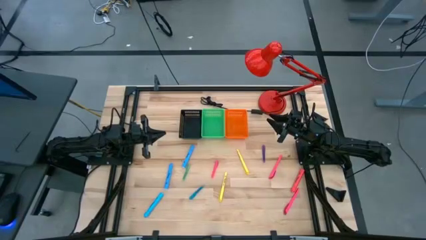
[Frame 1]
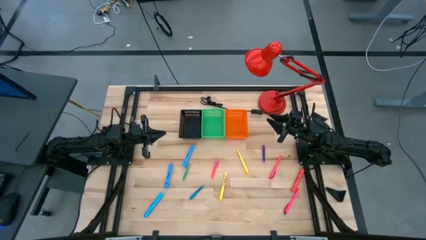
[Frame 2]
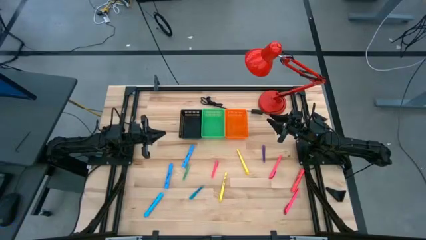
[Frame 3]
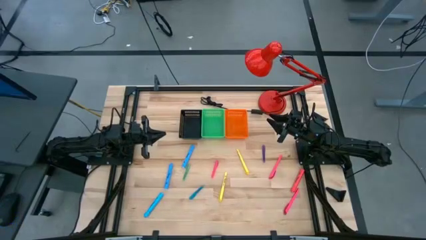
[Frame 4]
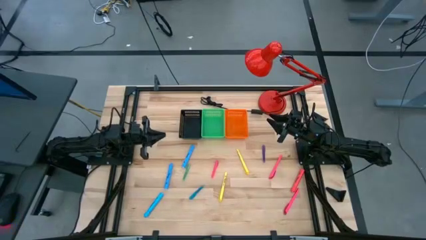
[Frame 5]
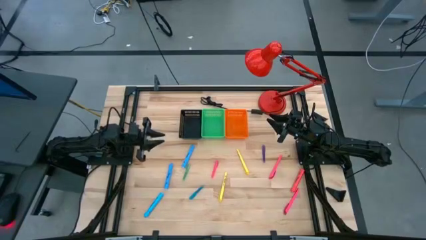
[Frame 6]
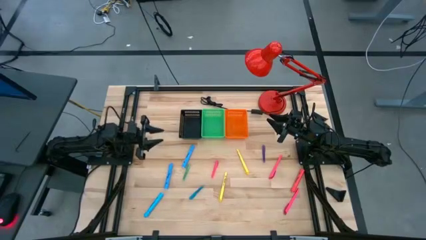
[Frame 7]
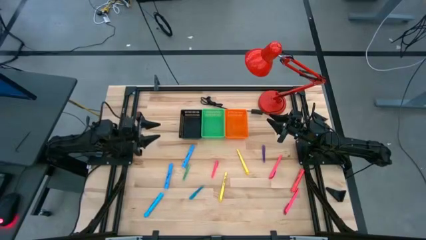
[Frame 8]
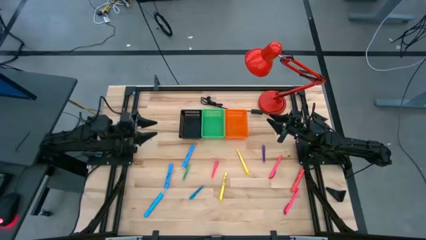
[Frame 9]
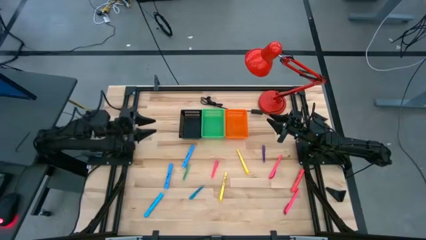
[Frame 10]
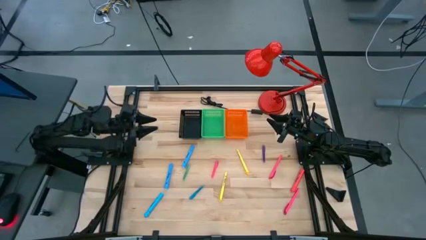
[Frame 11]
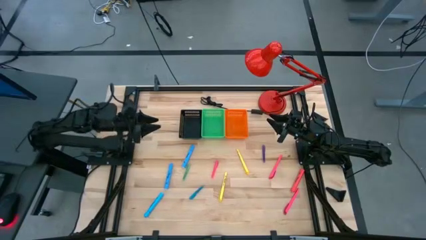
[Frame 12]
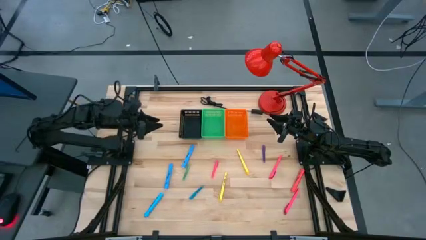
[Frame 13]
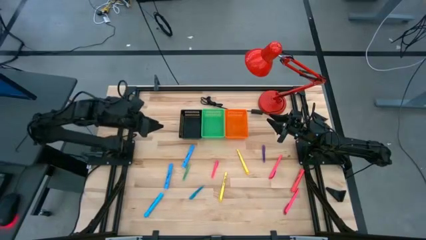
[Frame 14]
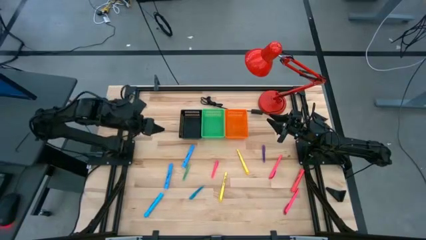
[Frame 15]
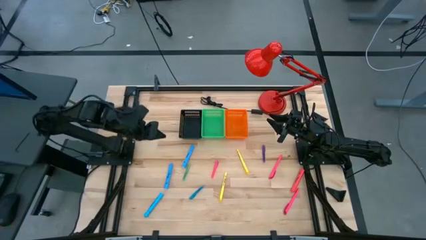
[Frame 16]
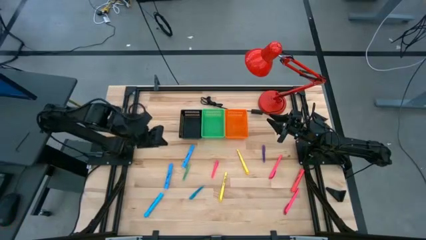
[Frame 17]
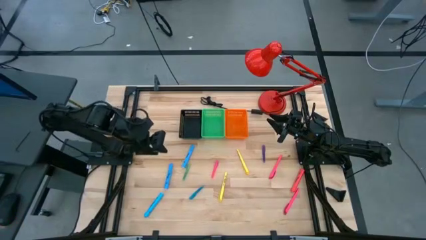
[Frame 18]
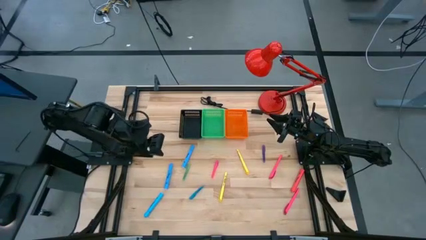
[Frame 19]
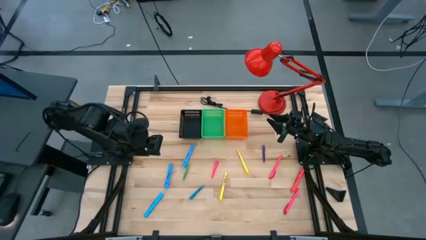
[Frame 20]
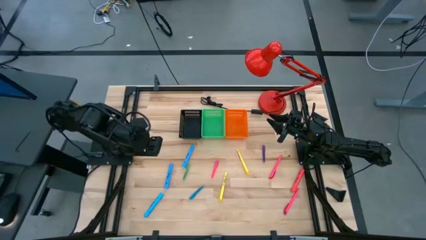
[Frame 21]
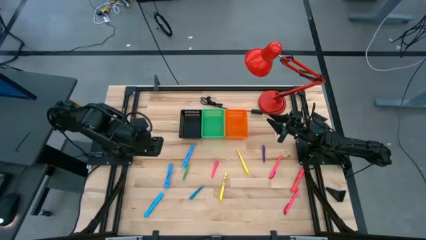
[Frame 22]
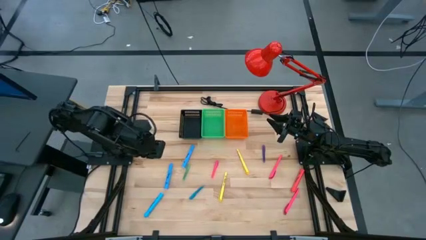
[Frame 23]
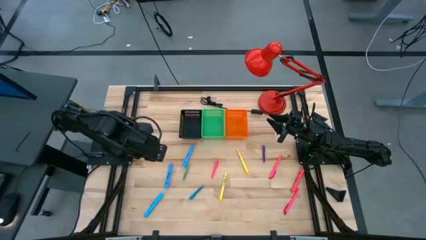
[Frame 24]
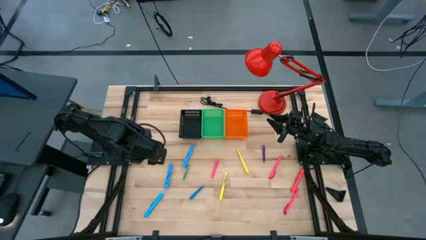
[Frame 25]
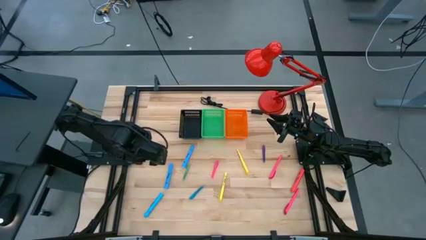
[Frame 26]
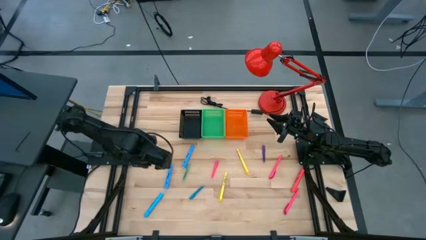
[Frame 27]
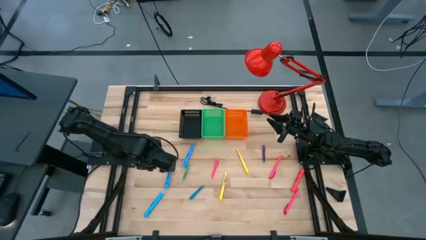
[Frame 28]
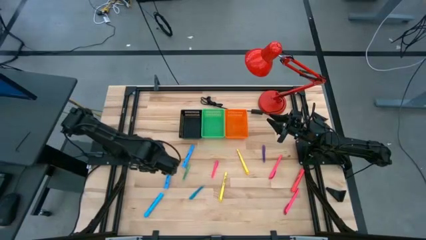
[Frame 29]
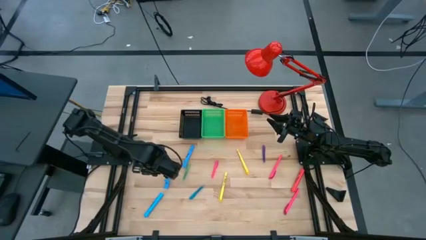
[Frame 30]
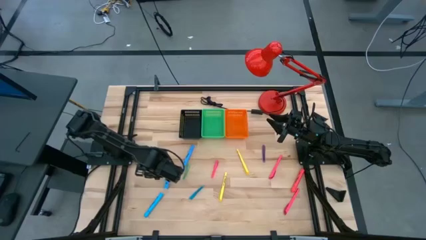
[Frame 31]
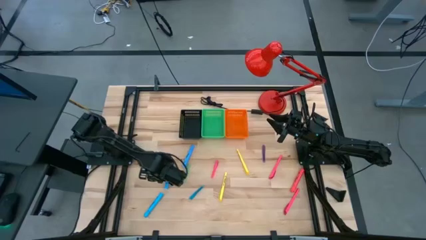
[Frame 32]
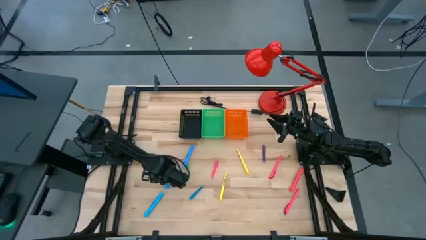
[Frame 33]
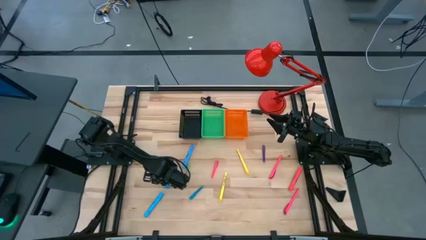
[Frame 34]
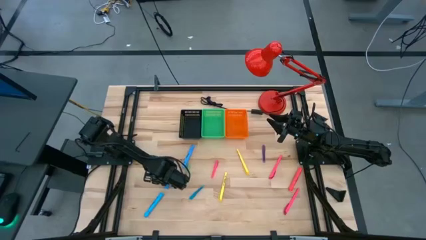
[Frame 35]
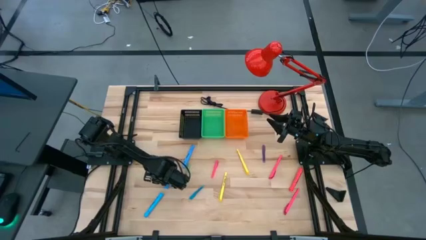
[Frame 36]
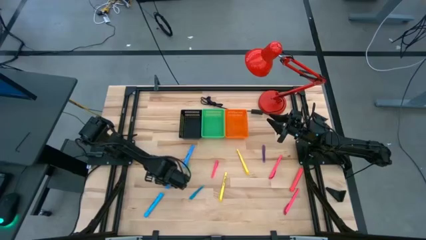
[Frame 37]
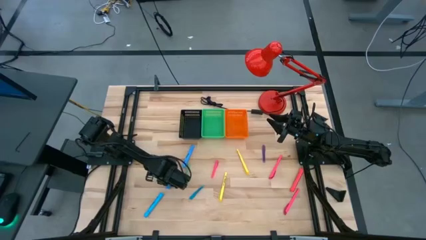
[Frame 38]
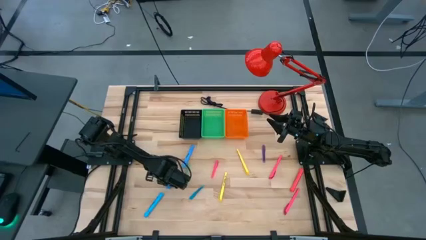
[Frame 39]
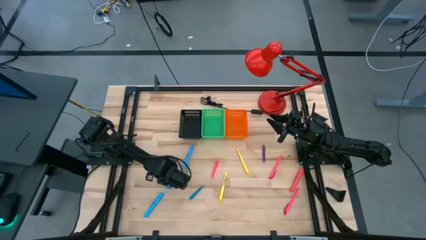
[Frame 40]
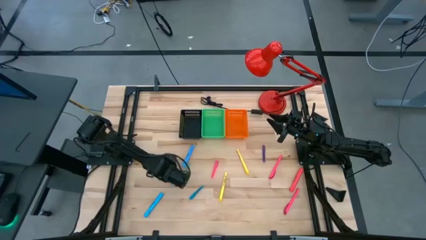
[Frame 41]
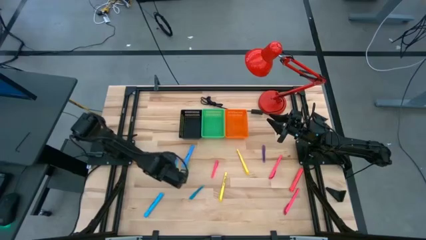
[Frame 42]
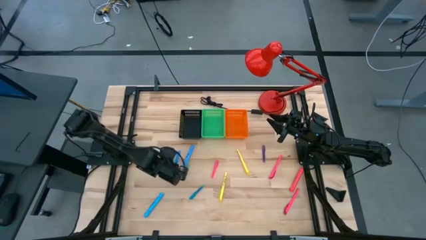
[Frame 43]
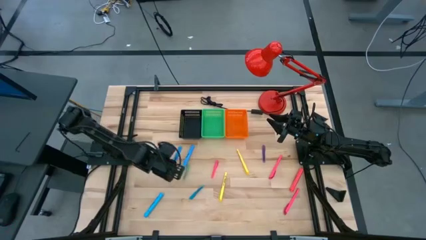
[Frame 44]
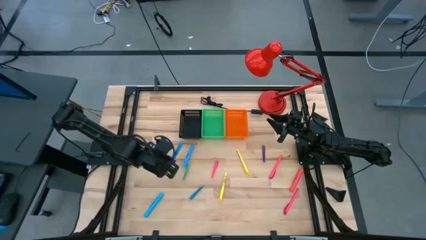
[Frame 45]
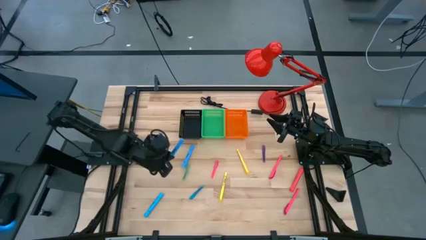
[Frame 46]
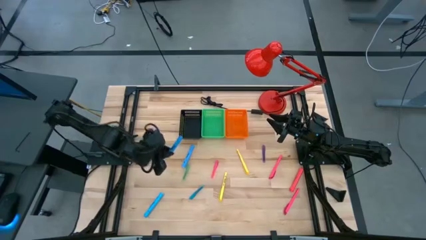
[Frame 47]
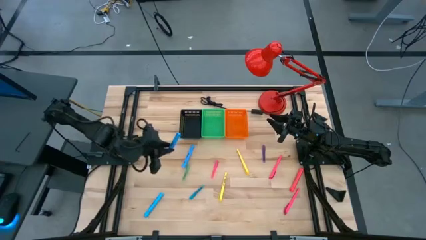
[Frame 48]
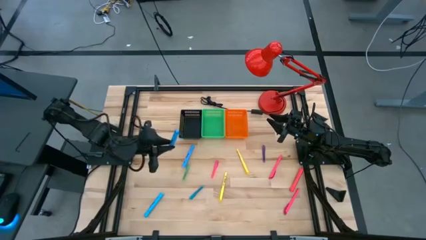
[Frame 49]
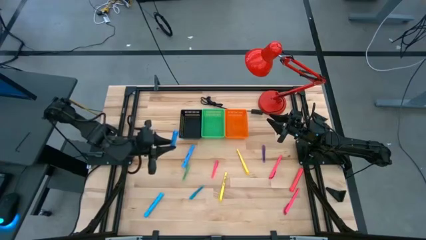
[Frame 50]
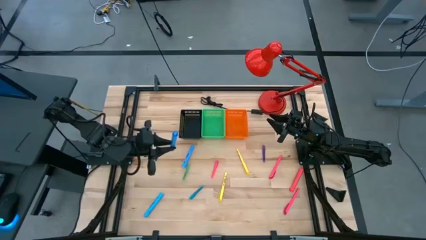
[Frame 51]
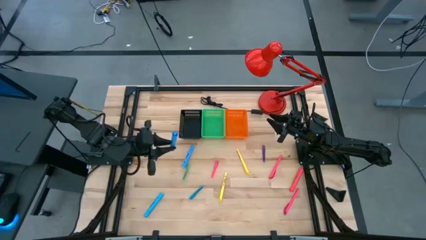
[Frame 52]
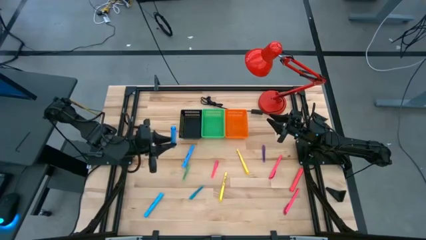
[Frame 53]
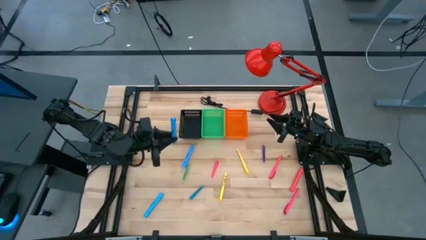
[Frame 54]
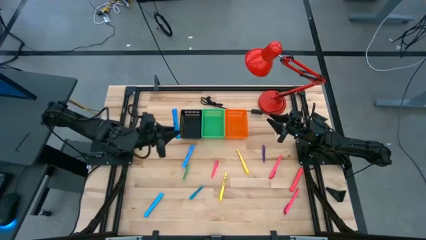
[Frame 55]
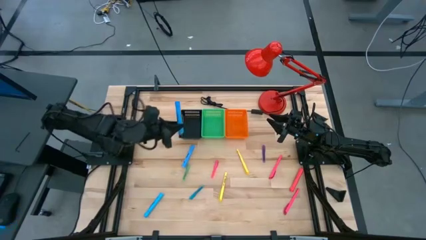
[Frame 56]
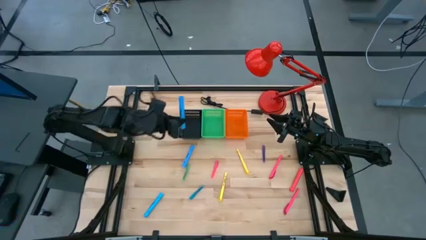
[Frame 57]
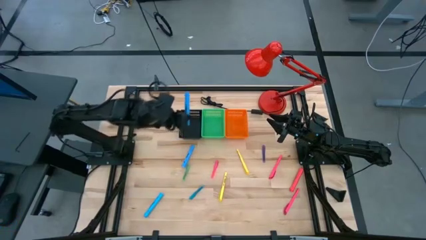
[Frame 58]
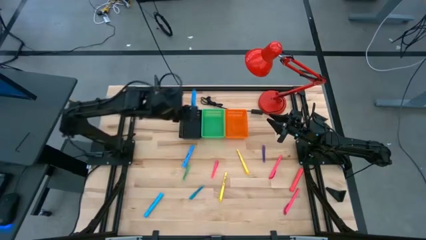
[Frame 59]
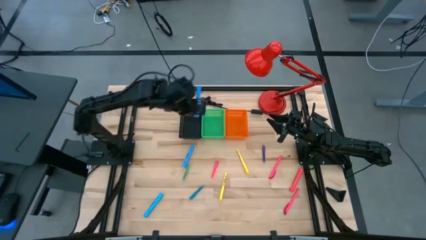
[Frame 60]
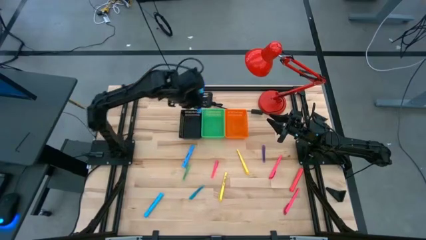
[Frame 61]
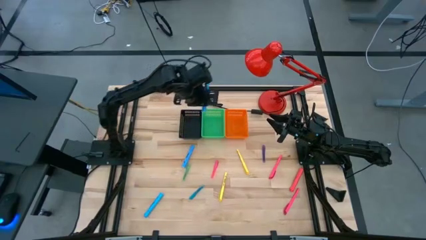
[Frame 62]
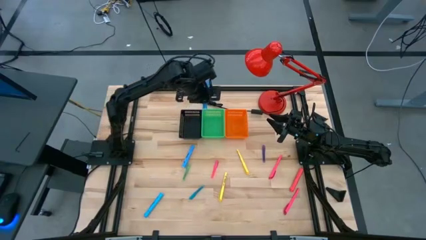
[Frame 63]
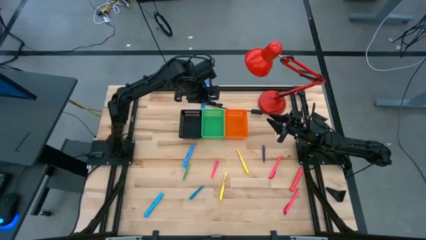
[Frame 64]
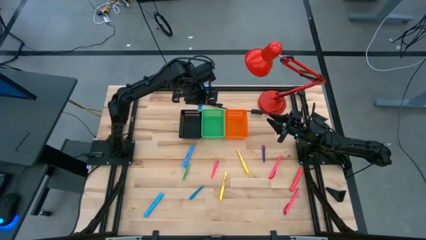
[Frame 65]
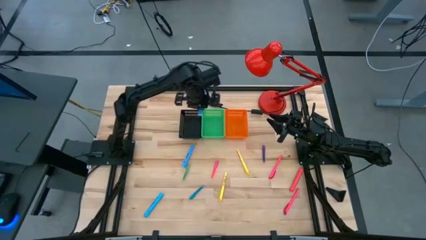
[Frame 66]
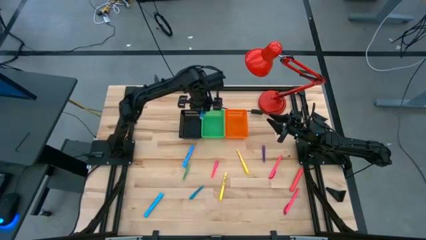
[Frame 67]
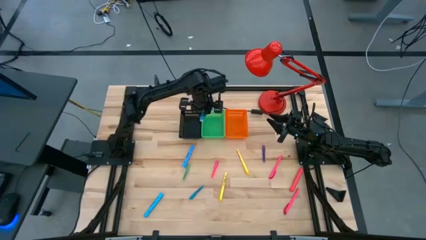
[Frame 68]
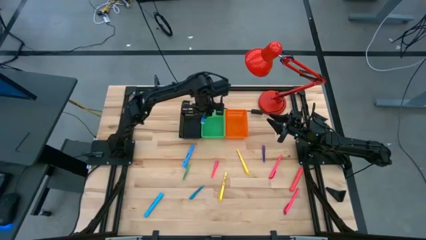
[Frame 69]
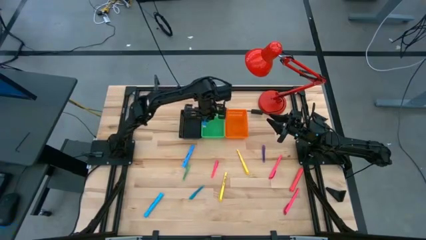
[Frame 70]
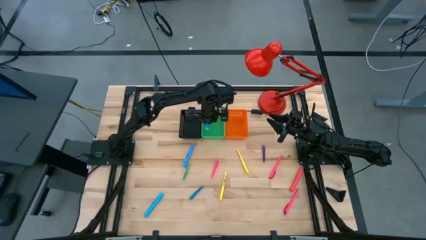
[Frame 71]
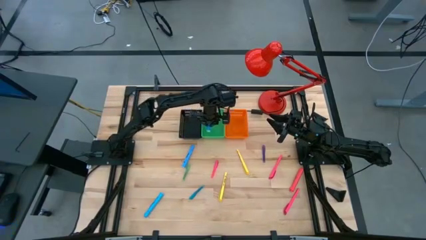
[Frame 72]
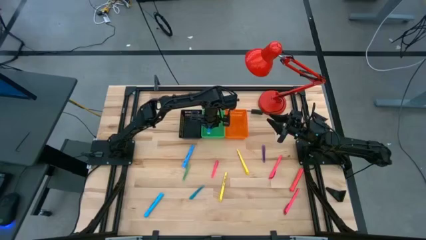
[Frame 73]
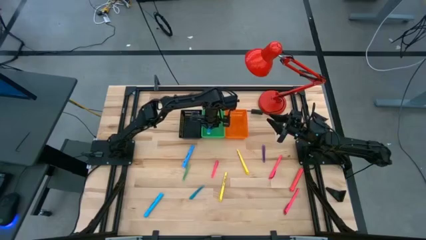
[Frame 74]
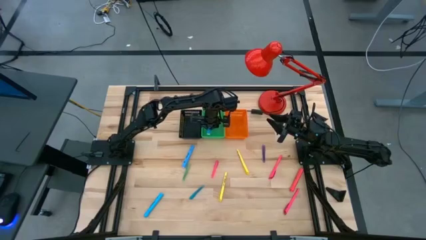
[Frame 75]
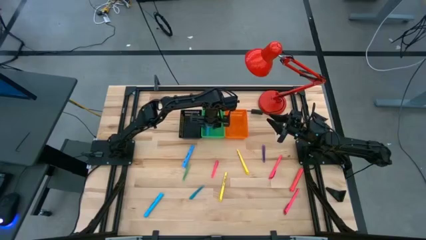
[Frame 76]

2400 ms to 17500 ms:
Task: Pick & Place Markers
Put the middle large blue highlighter pen into the green bin
